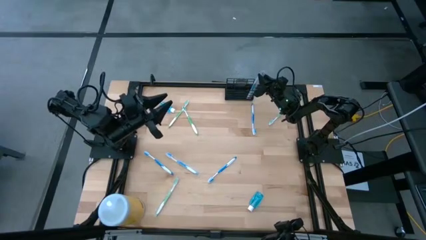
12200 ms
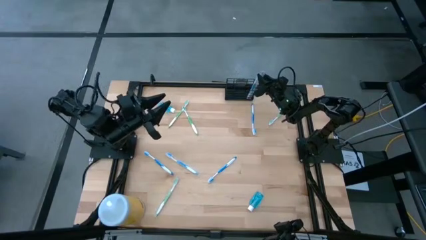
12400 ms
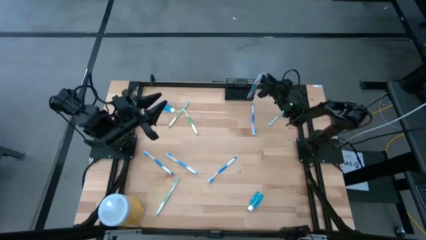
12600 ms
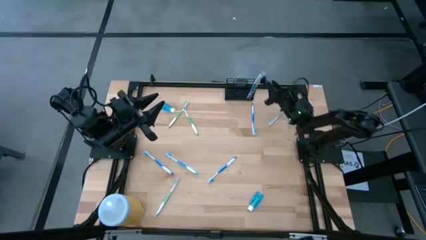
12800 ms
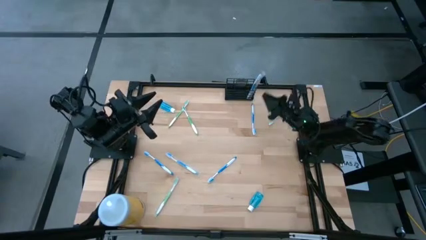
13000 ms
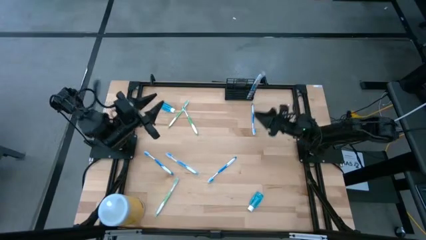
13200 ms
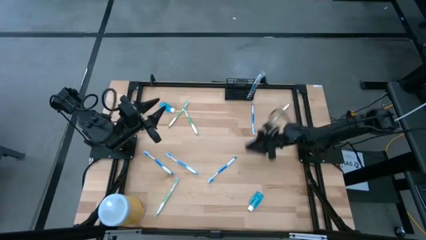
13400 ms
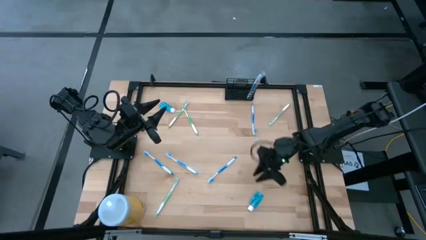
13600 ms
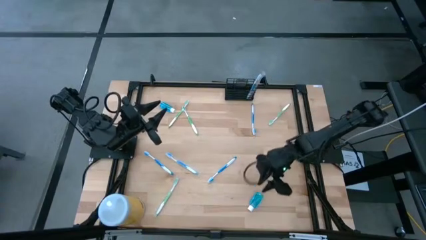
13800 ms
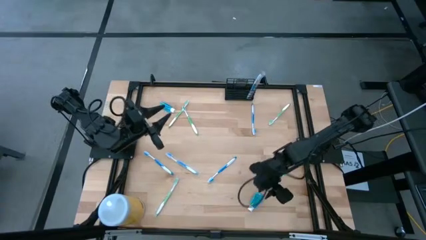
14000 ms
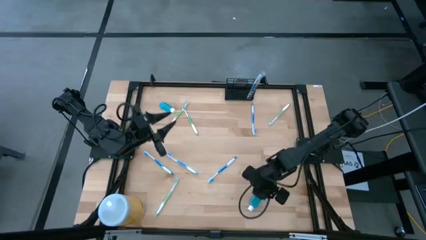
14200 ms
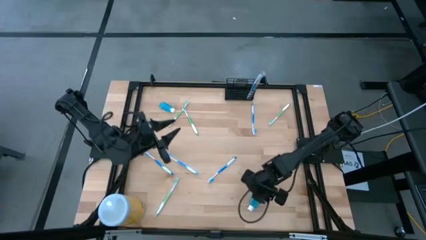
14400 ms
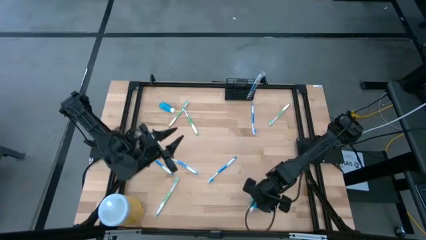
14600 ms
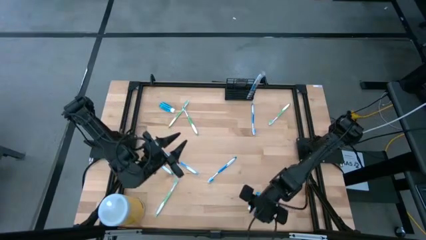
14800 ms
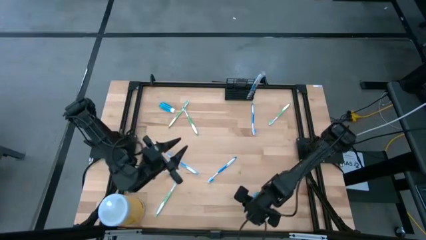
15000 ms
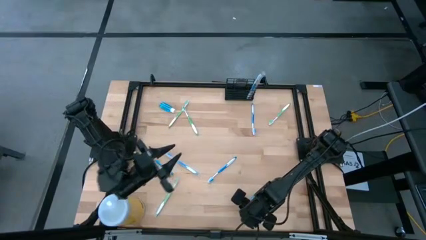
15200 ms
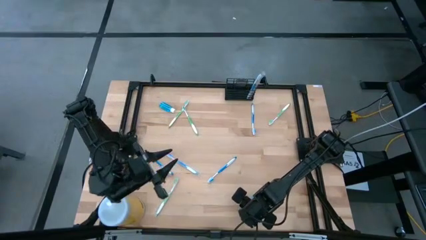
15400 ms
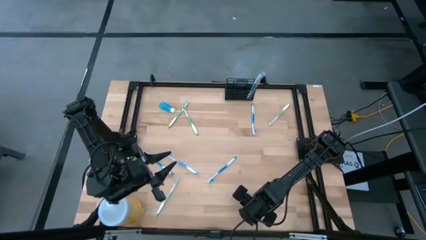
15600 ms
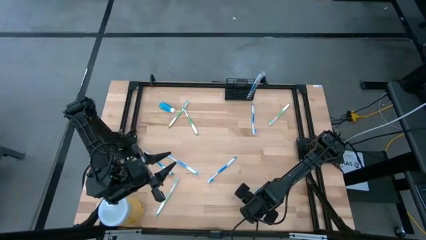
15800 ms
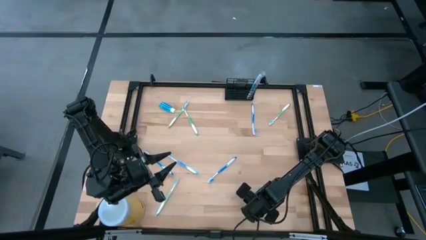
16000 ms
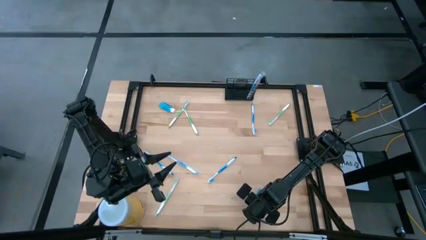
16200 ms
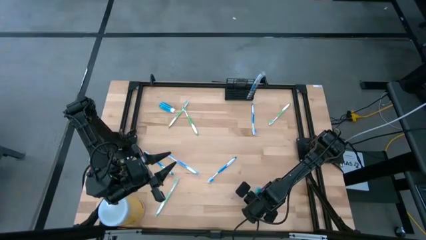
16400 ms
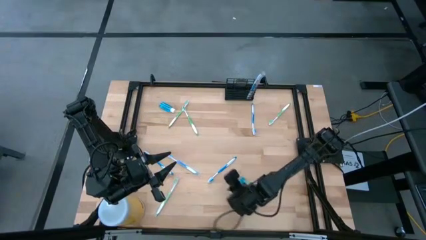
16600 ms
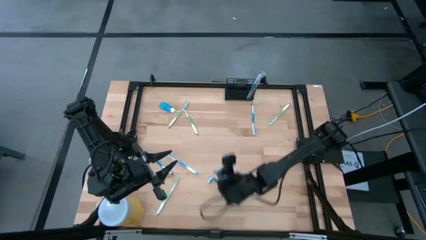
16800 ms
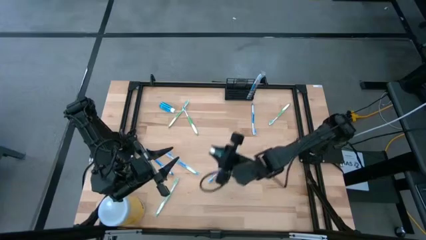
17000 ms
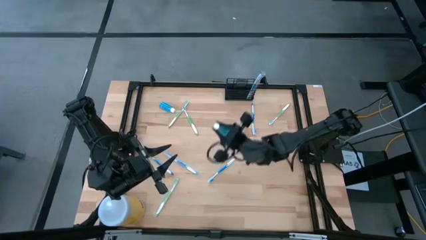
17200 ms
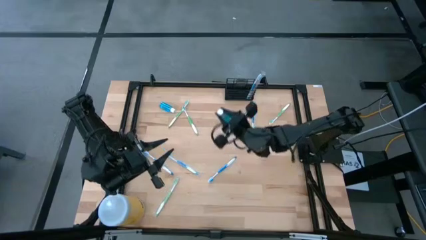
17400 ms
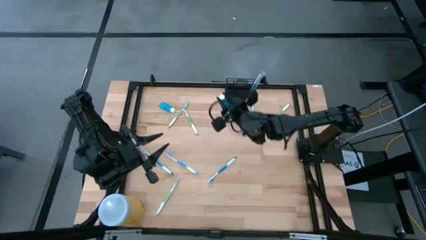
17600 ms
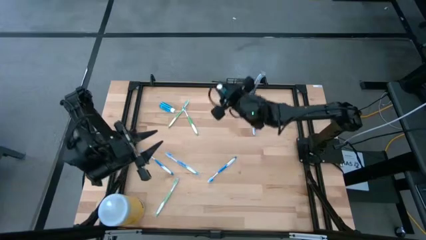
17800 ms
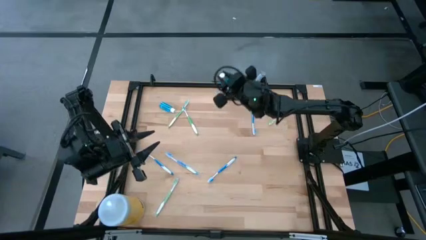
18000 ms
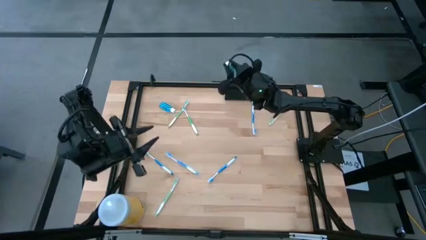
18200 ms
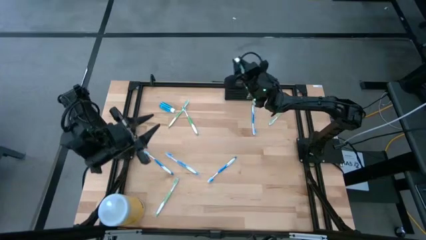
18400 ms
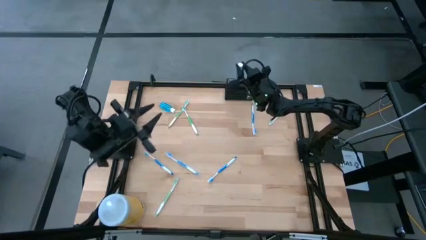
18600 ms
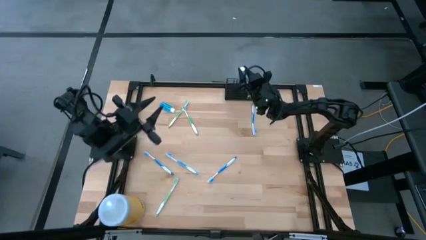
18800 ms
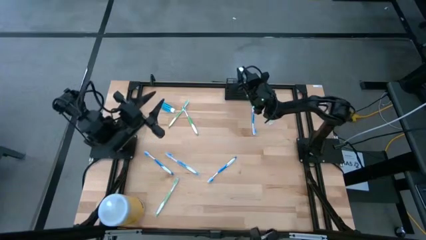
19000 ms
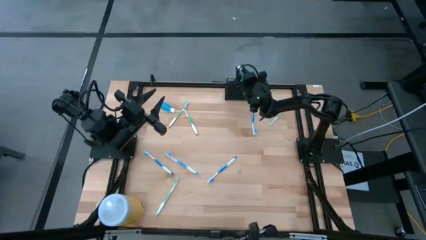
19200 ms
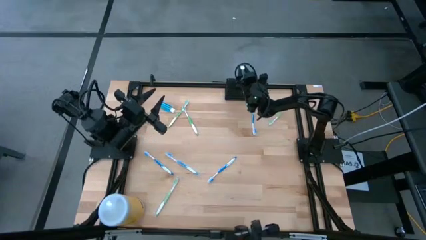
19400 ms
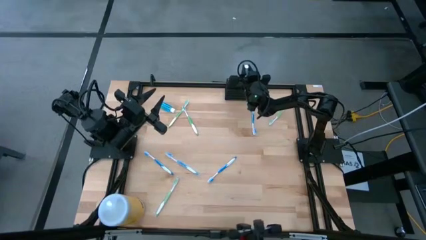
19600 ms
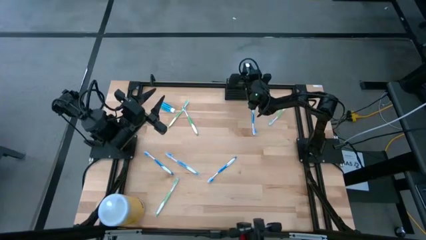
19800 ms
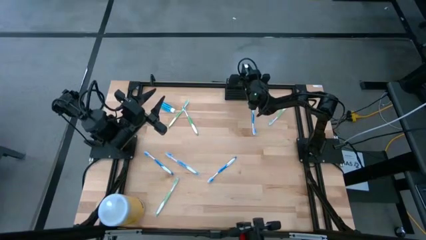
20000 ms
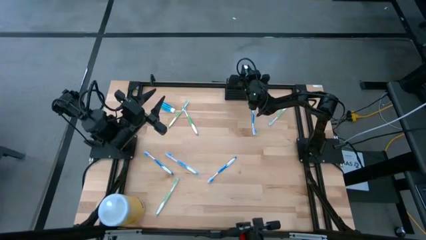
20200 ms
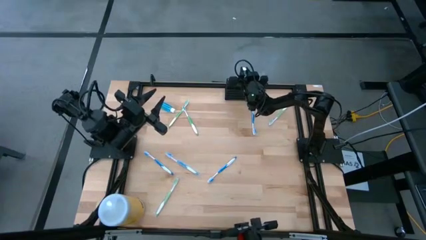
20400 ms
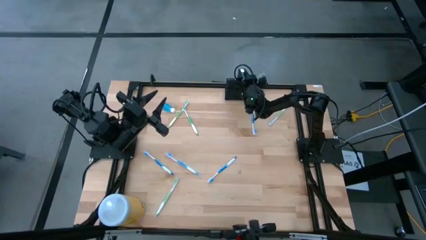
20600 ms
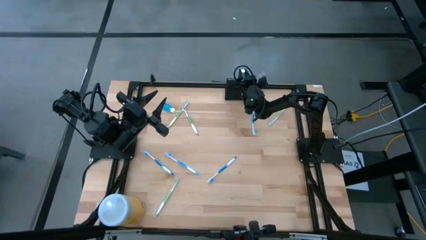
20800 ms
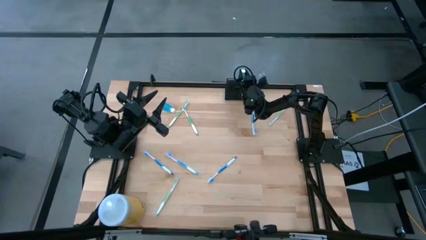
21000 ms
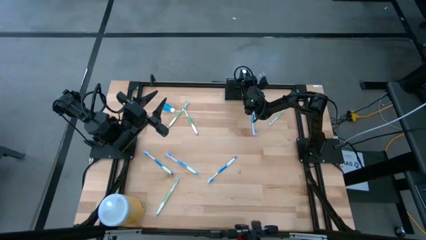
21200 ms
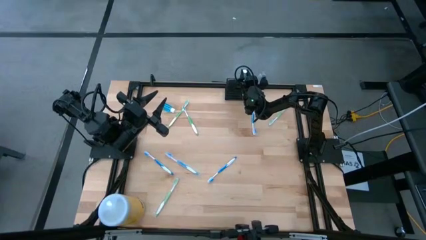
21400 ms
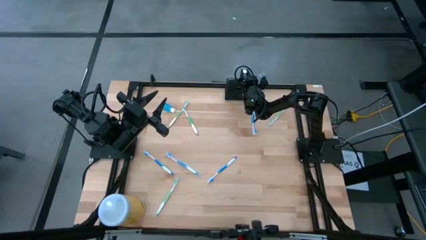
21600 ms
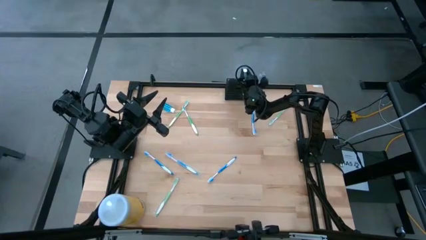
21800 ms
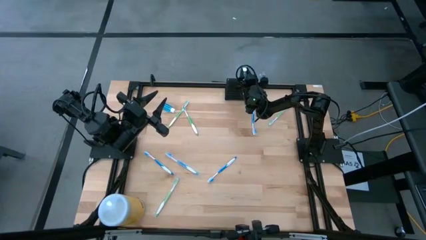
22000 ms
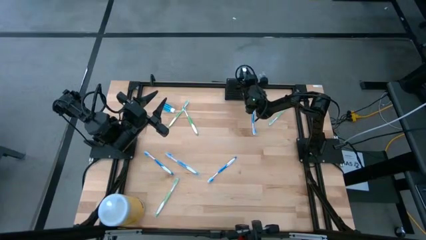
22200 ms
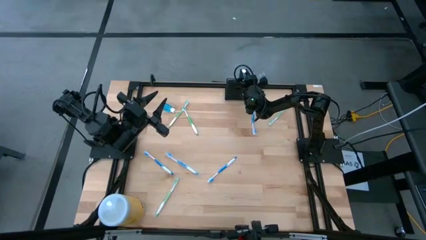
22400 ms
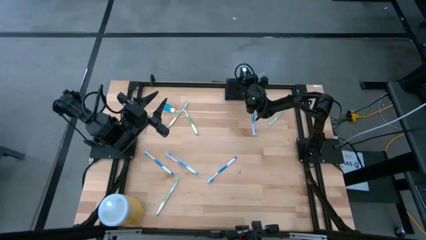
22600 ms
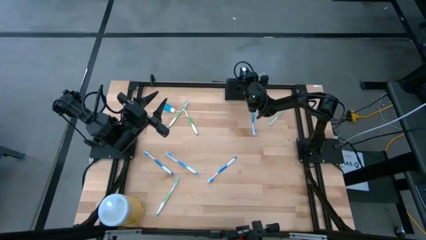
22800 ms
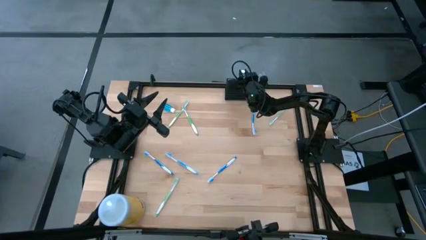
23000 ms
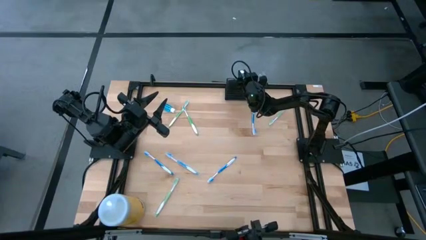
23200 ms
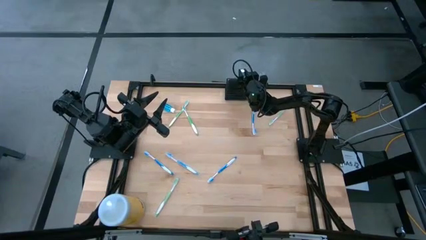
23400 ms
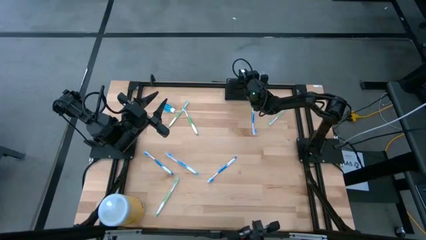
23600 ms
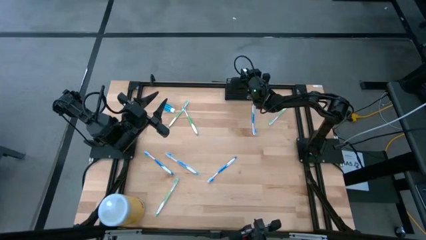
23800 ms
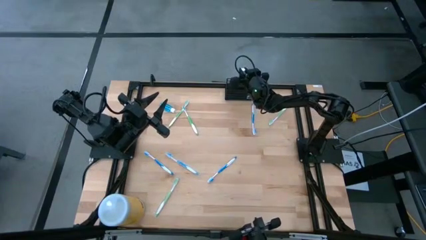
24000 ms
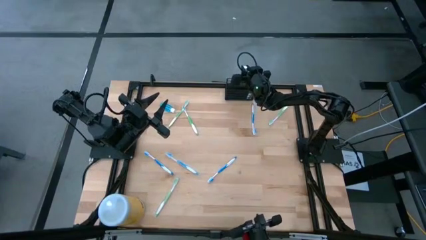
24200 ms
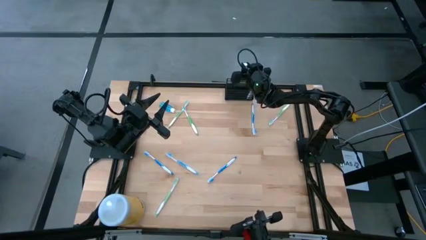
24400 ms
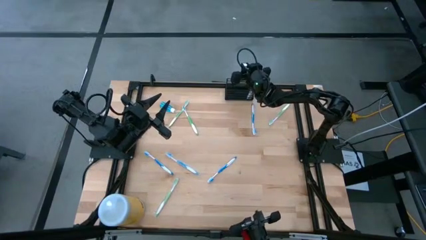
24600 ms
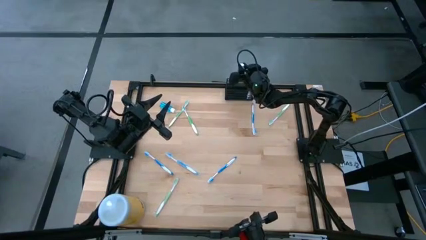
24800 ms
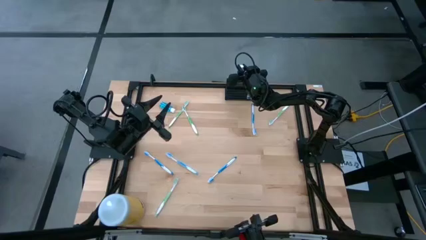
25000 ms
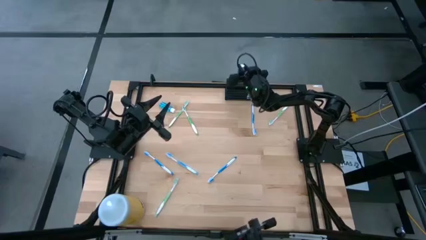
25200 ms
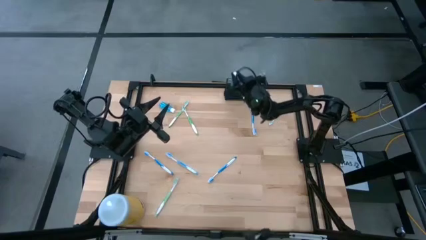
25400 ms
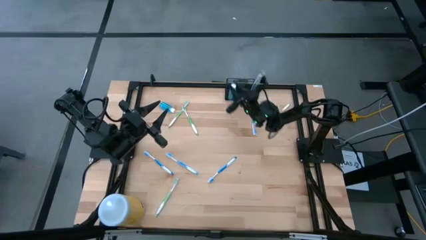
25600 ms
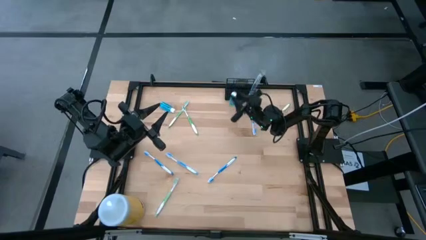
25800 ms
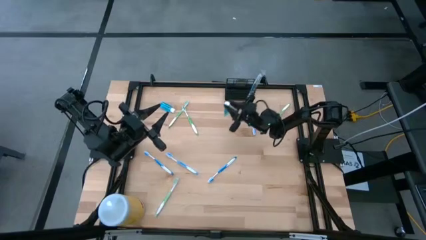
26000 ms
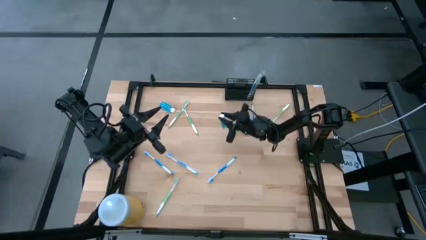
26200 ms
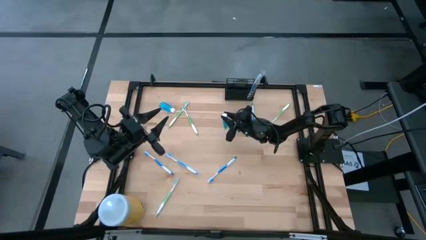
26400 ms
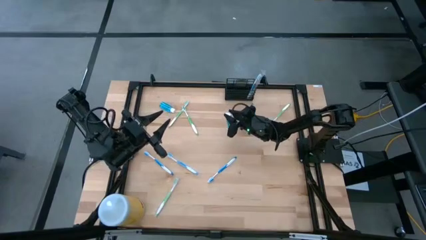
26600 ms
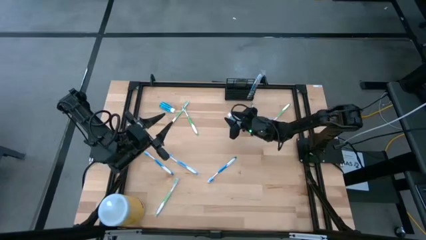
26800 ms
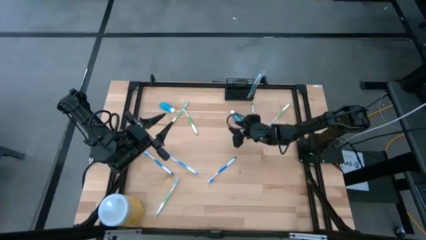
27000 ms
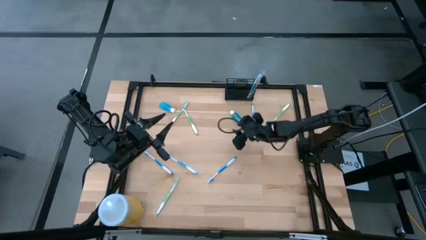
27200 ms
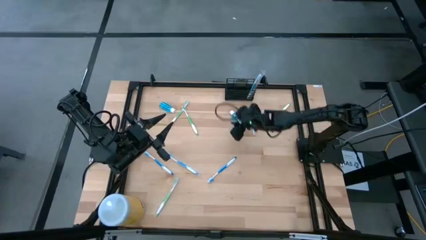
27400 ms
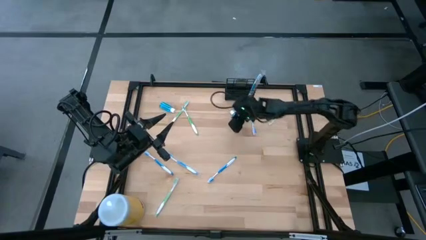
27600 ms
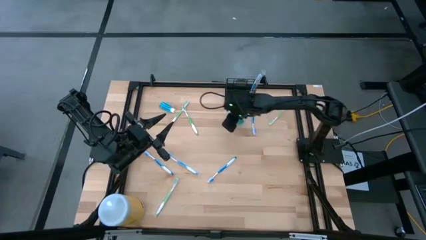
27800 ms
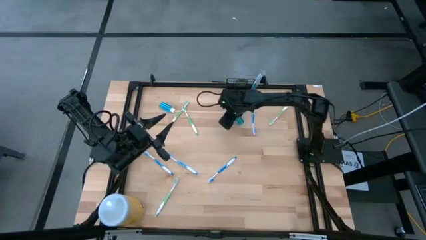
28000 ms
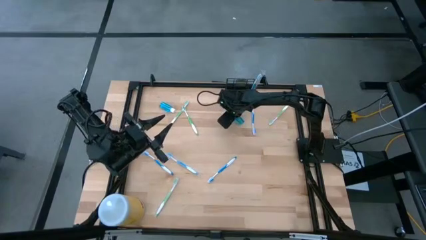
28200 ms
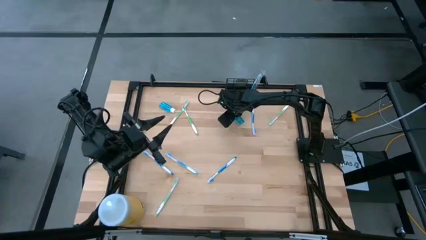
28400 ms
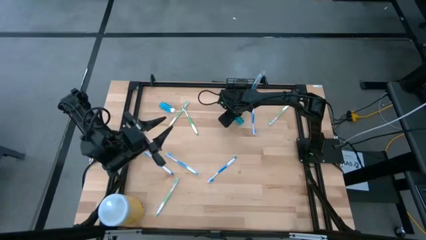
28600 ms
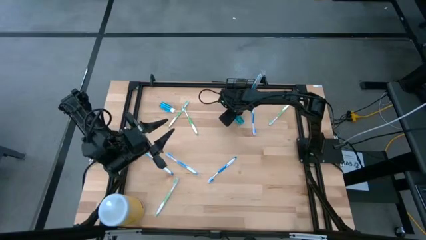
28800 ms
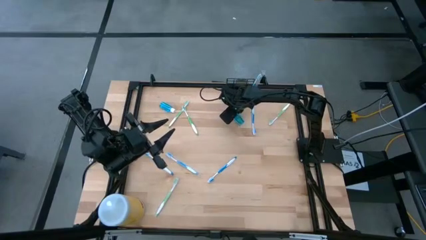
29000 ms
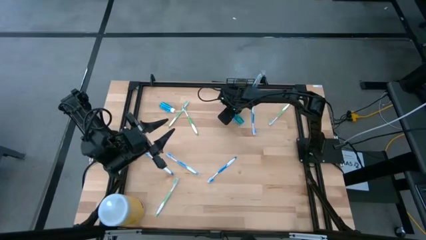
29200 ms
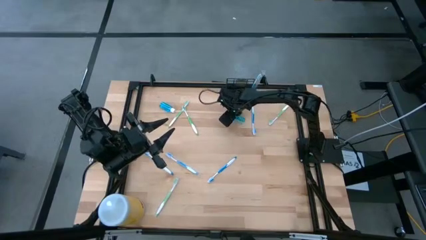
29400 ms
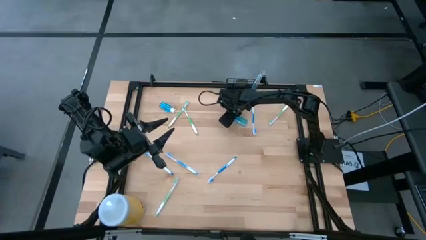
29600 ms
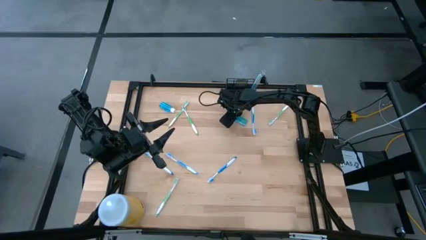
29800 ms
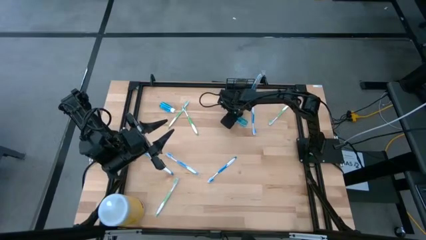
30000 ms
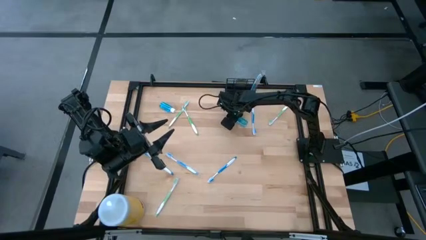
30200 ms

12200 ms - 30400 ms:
Task: Pick & Place toothbrushing station
Put the bottom blue mouthwash into the black organizer
